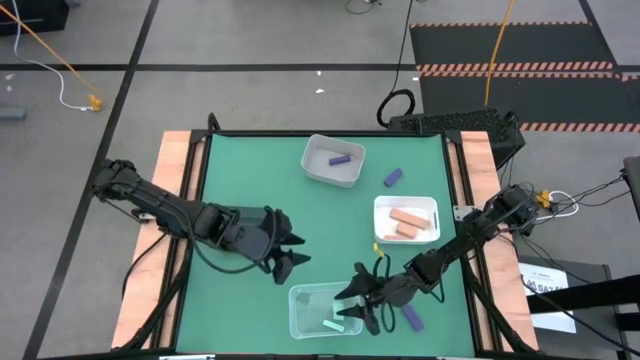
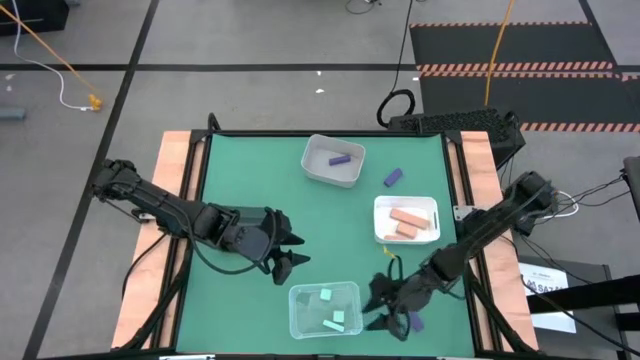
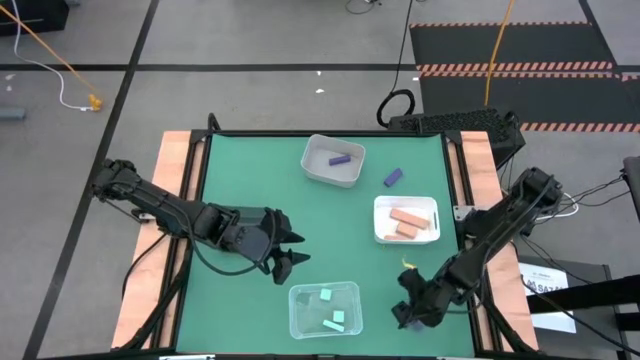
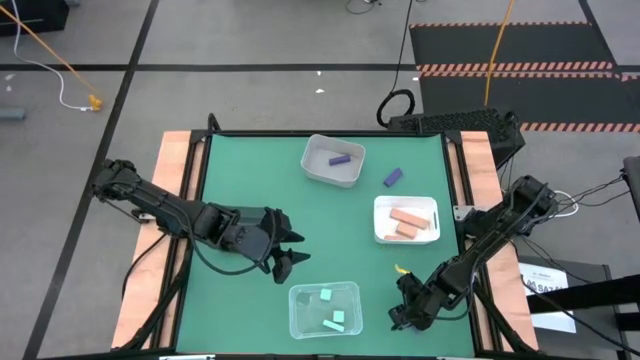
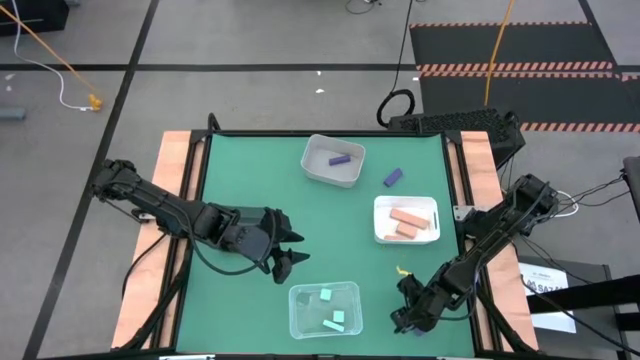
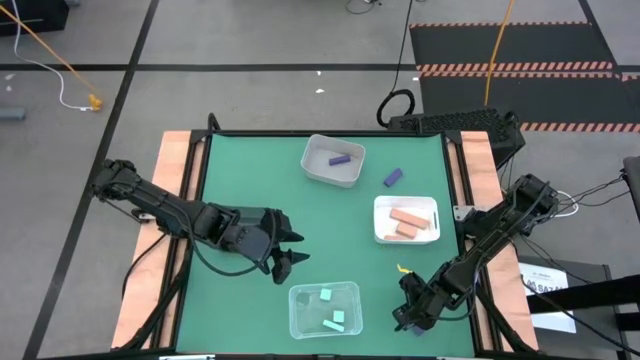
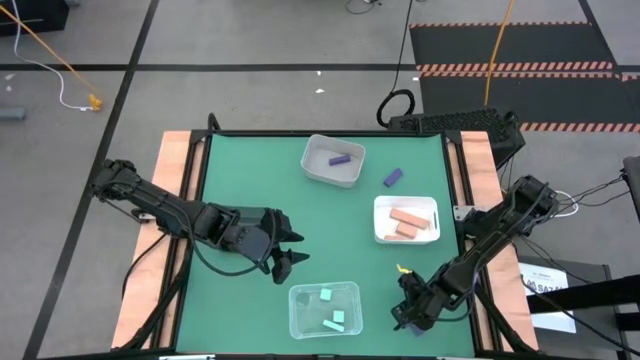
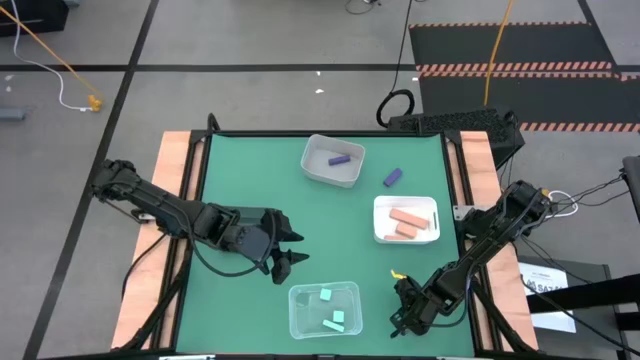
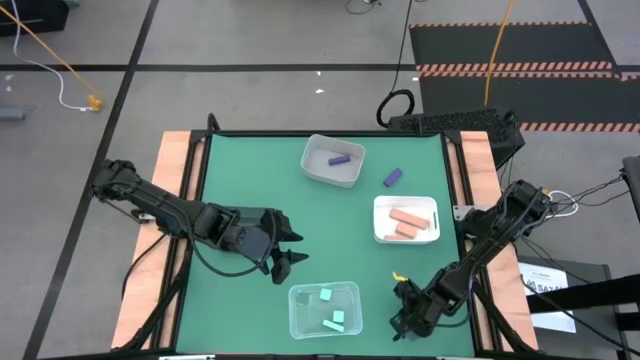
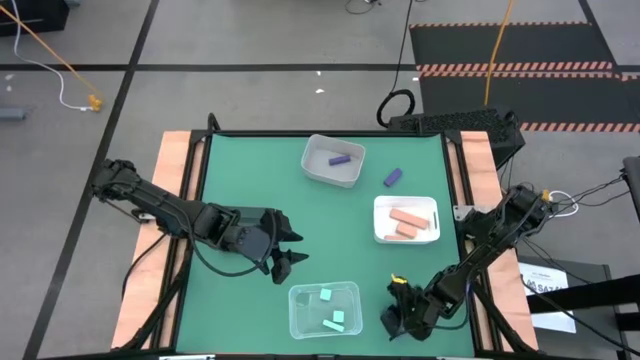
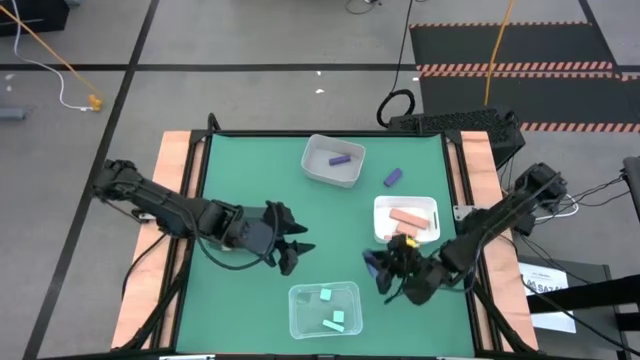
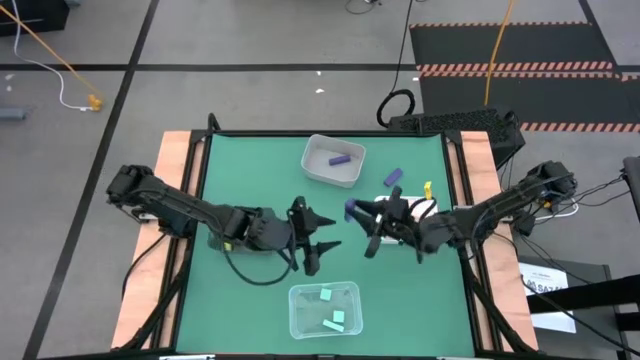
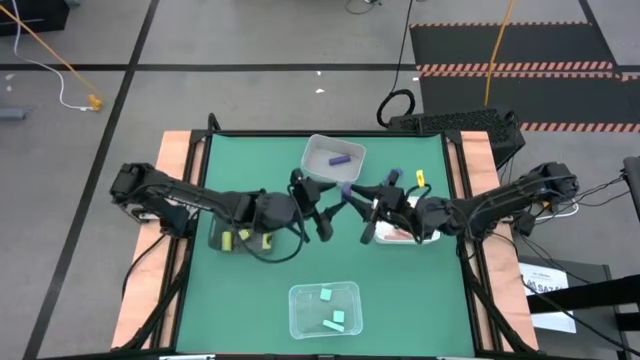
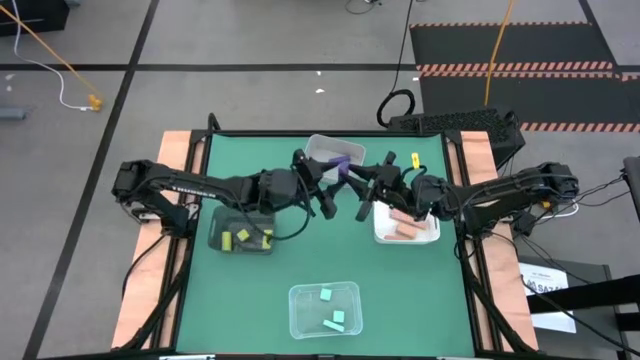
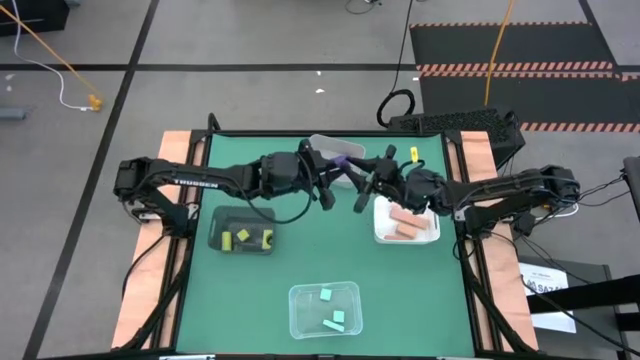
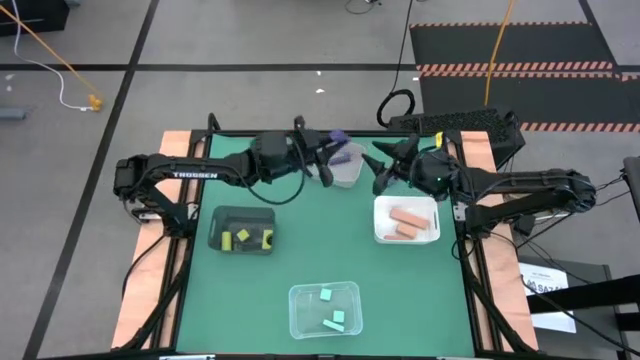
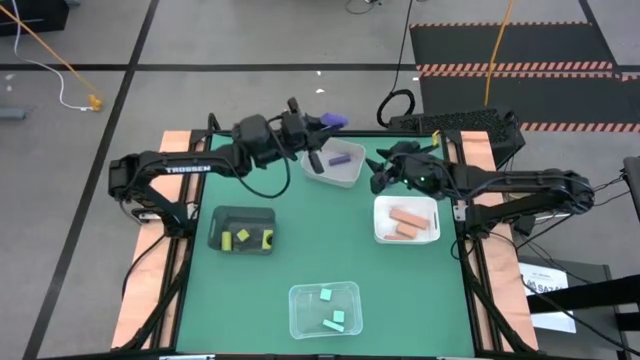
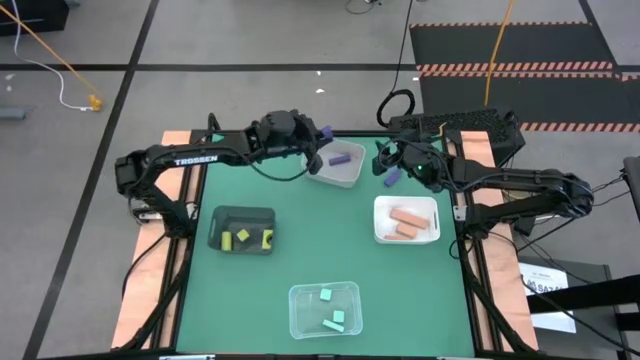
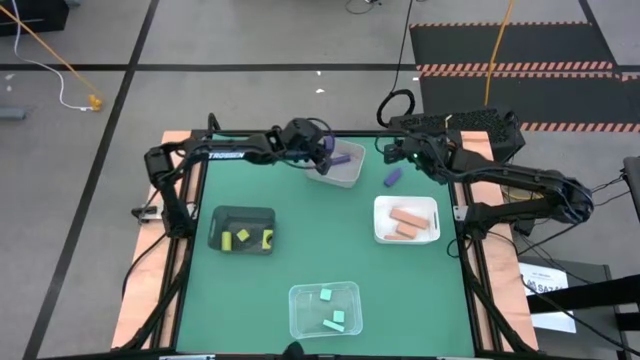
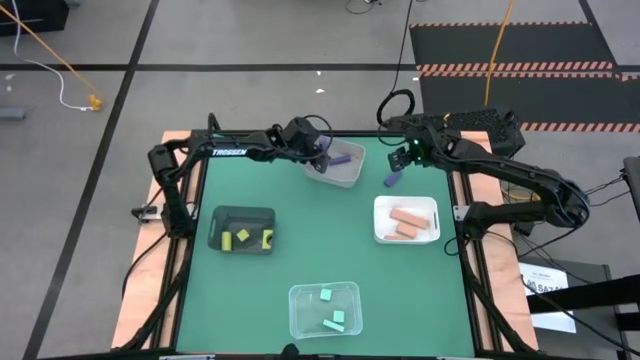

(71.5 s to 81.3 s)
Task: Sort & place blocks by color
Put the bottom violet block into the grey bin

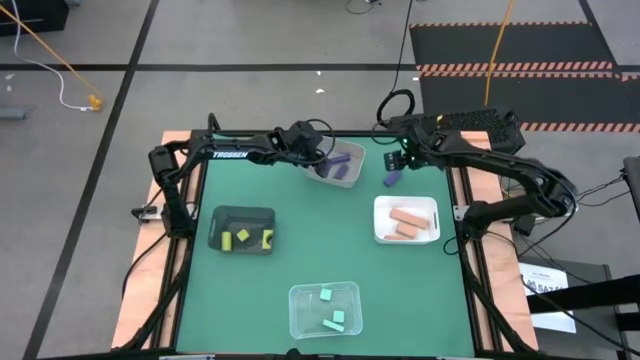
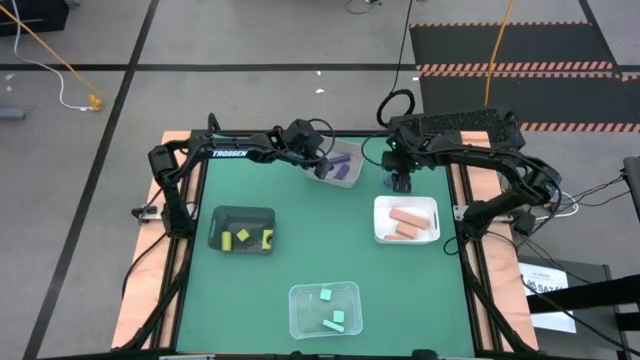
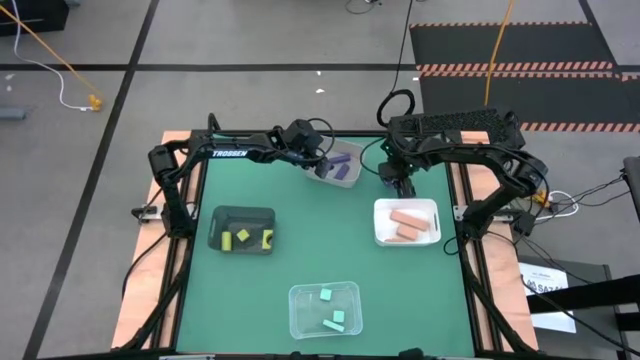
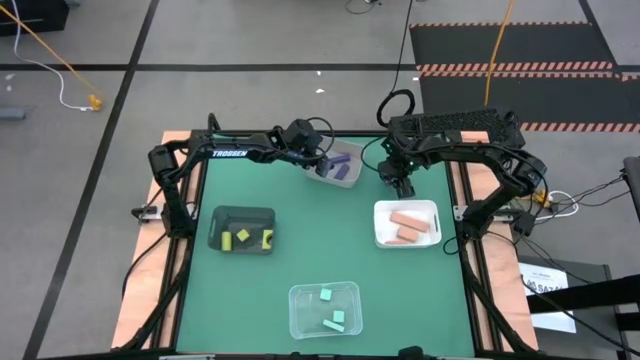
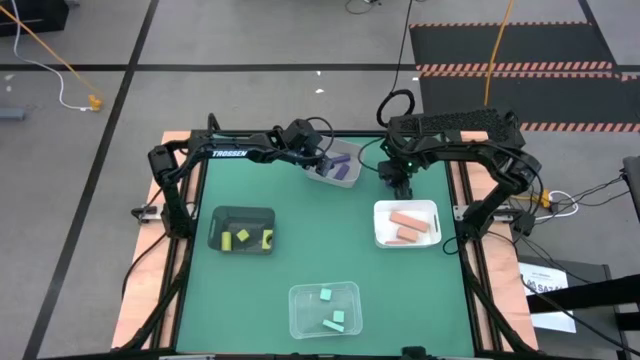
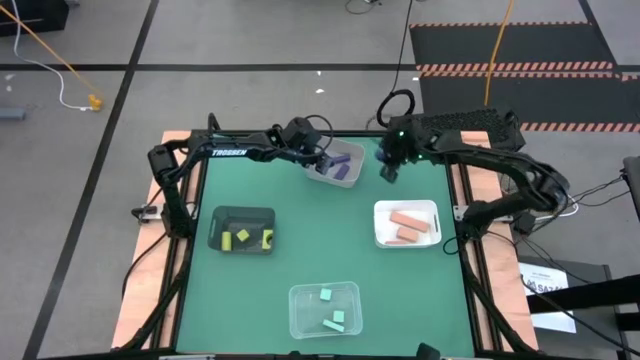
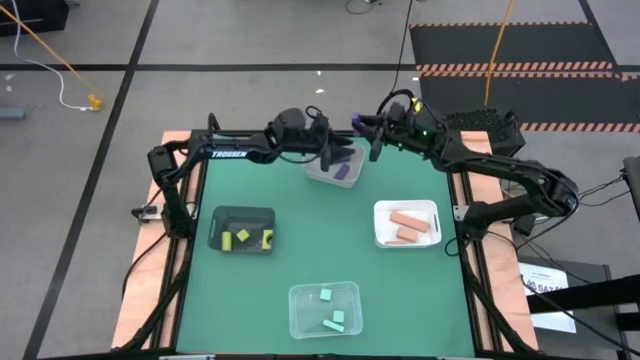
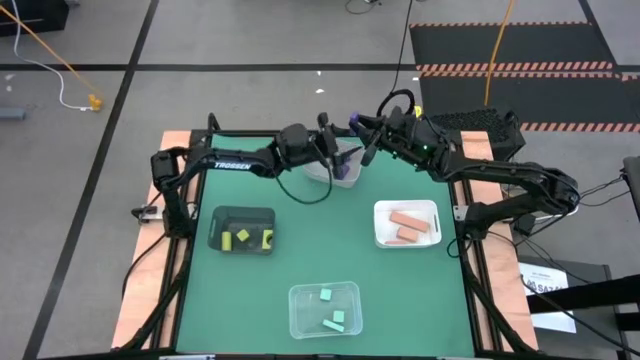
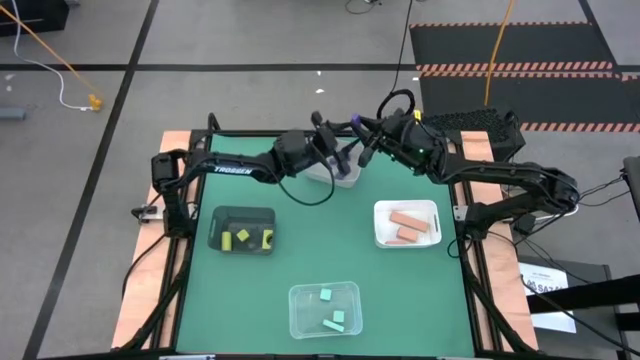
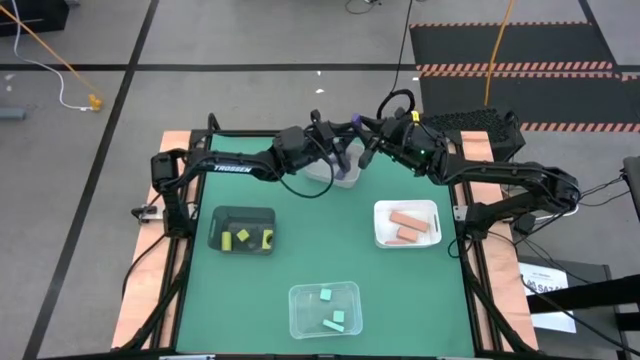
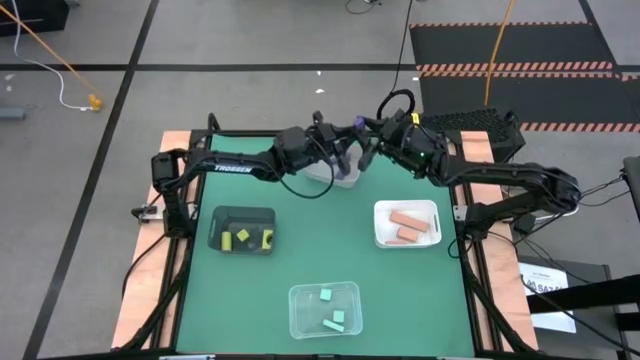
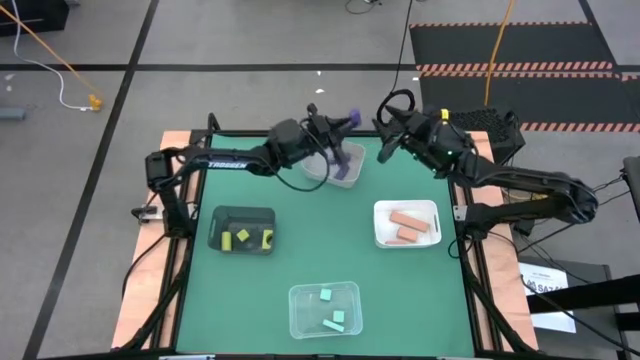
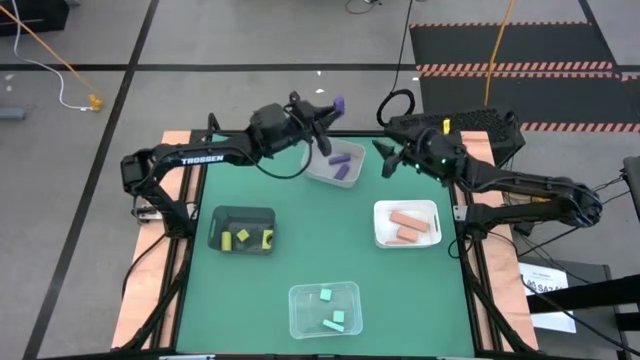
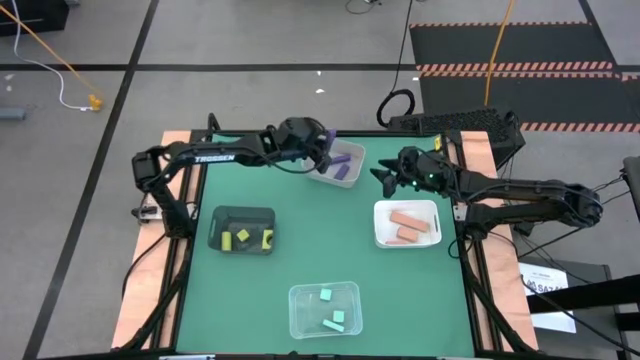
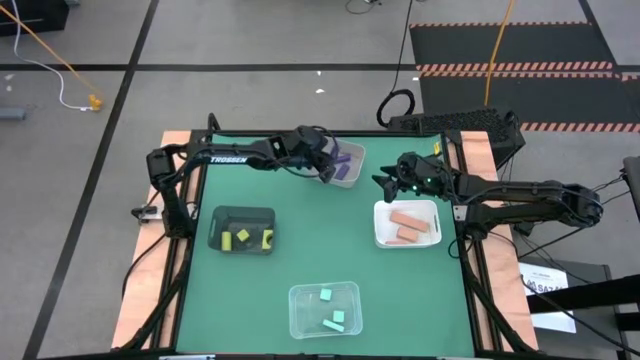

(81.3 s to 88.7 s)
Put the violet block into the grey bin

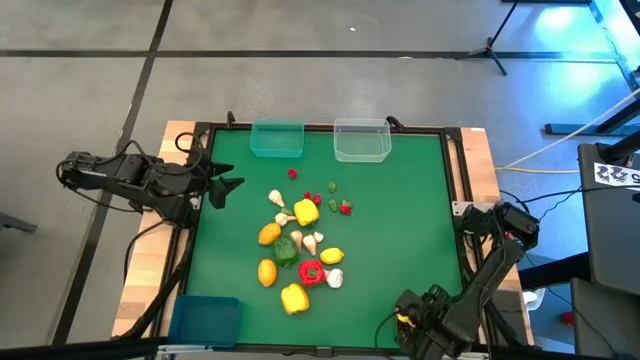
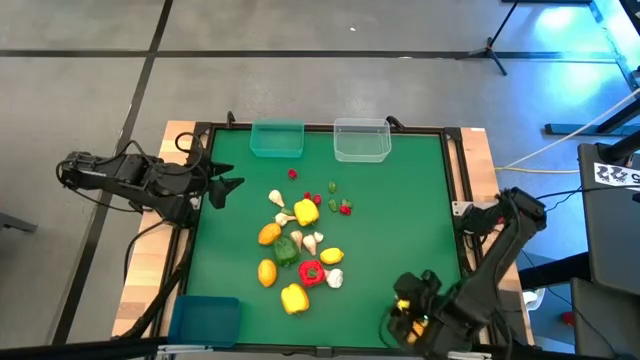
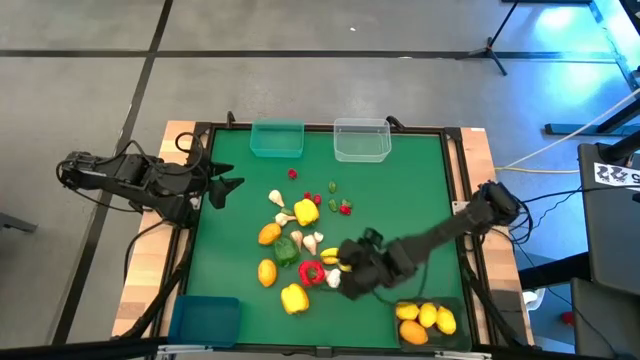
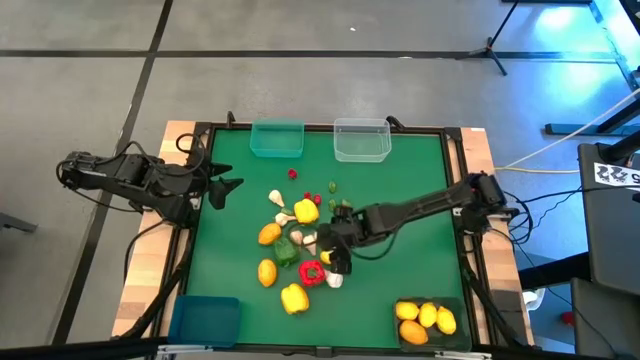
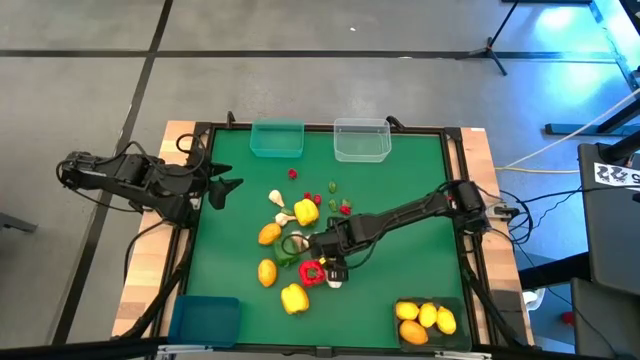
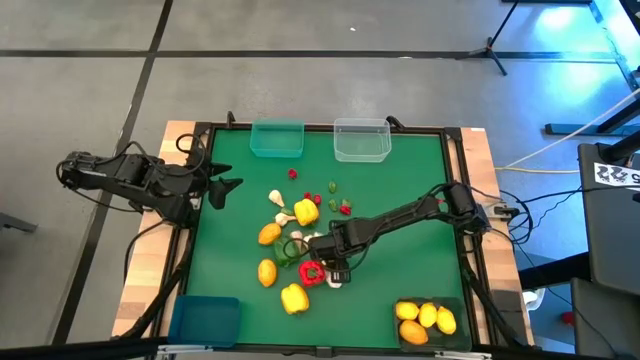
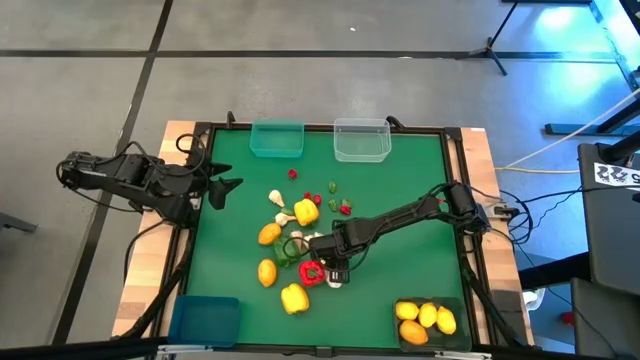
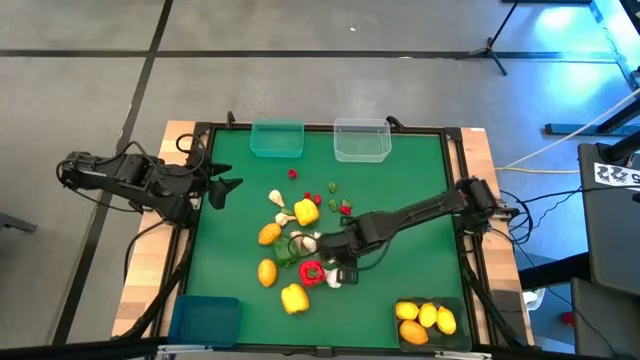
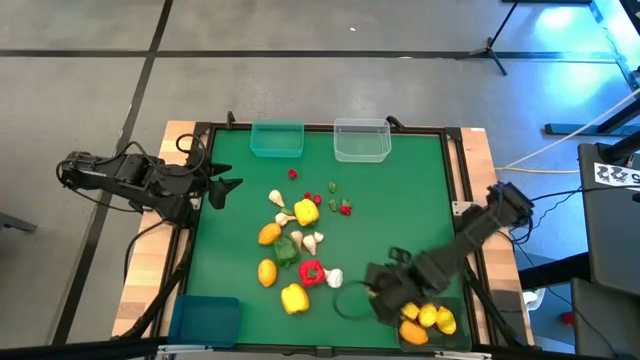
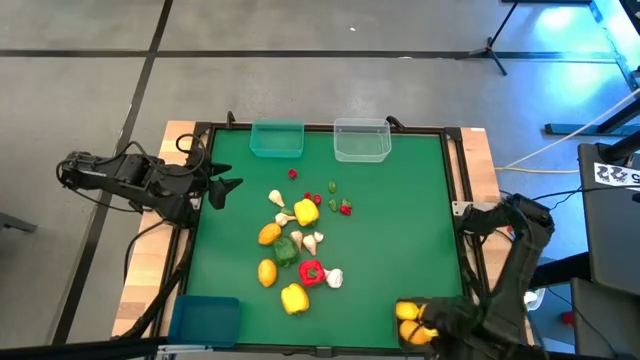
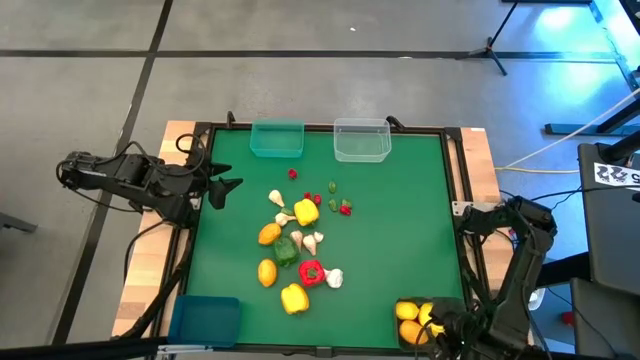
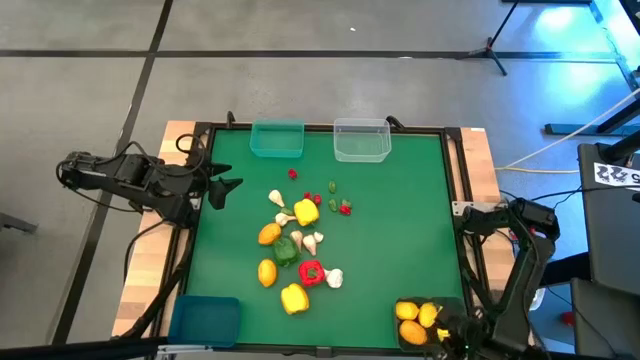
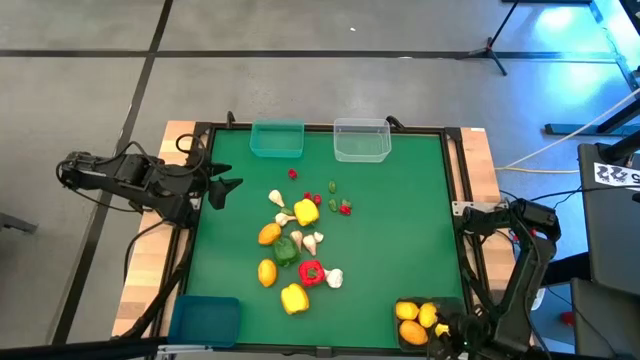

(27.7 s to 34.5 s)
Task: Sort produce into baskets
Put the lemon into the black bin
